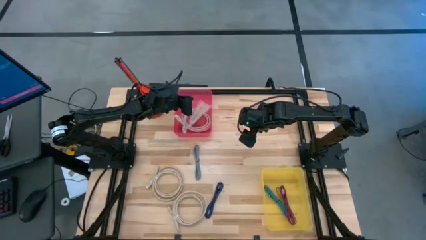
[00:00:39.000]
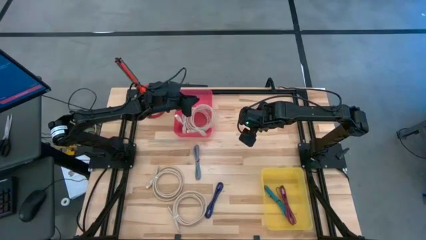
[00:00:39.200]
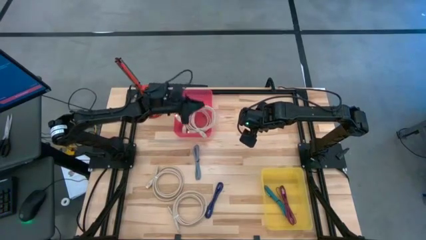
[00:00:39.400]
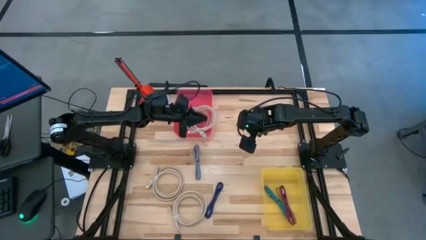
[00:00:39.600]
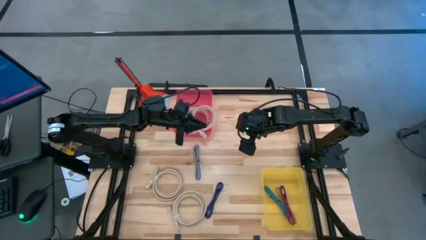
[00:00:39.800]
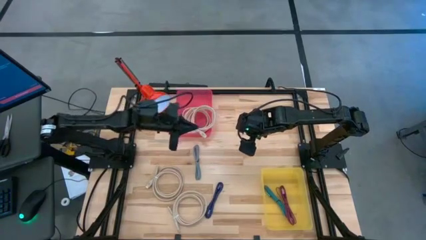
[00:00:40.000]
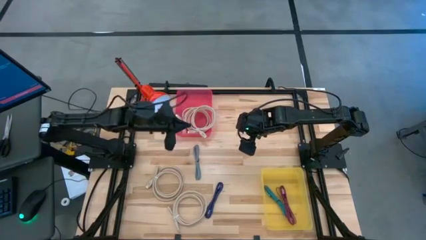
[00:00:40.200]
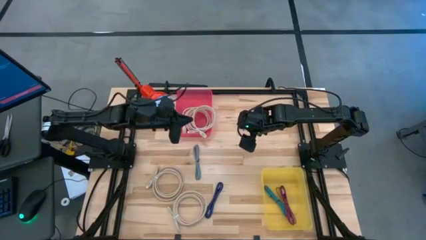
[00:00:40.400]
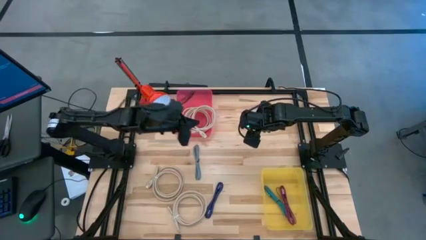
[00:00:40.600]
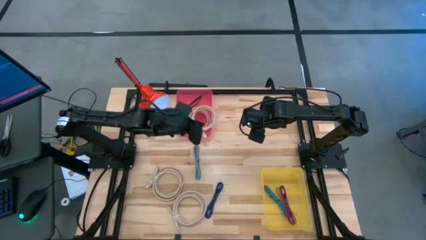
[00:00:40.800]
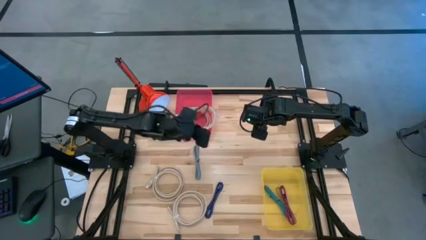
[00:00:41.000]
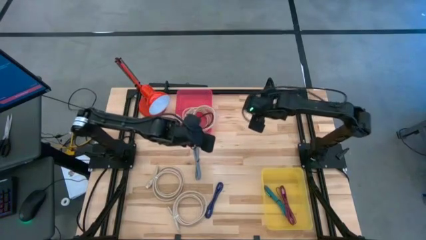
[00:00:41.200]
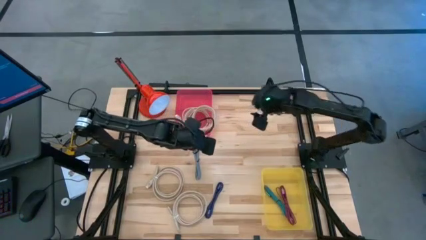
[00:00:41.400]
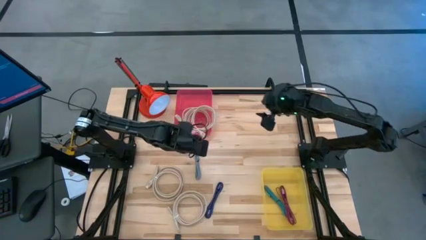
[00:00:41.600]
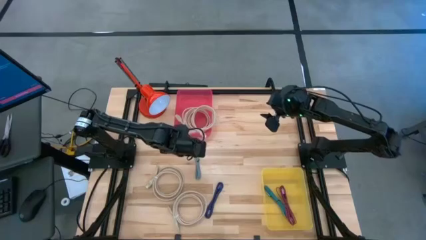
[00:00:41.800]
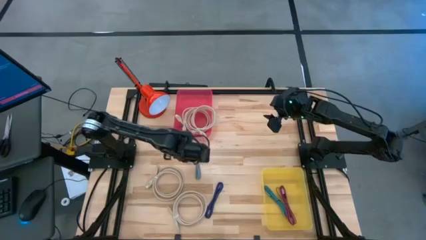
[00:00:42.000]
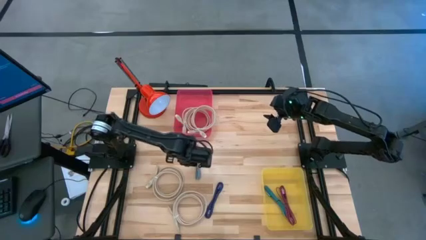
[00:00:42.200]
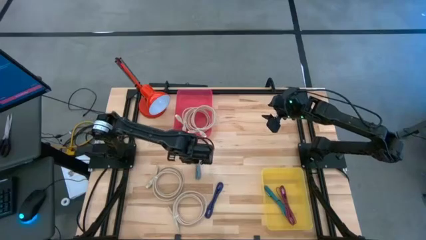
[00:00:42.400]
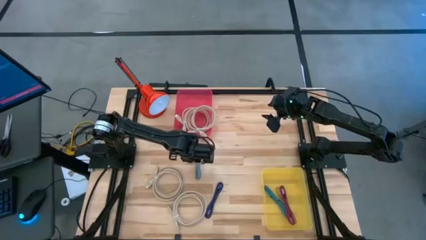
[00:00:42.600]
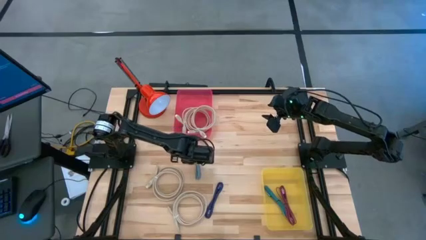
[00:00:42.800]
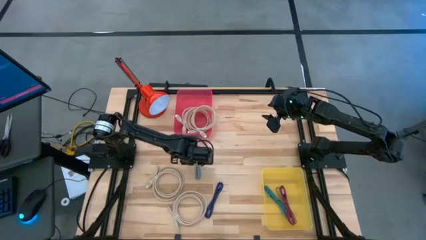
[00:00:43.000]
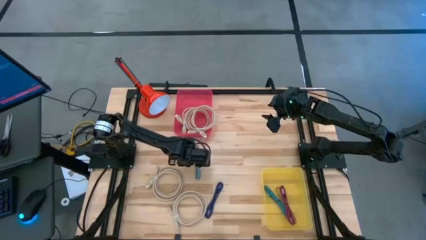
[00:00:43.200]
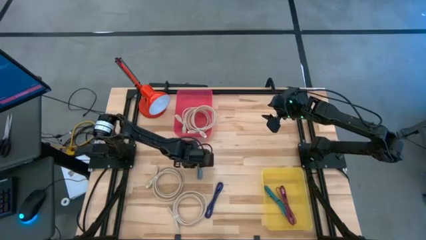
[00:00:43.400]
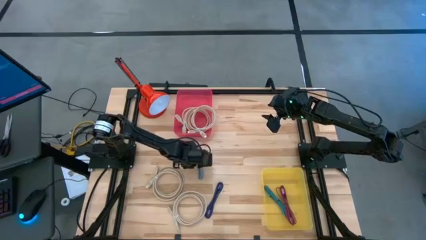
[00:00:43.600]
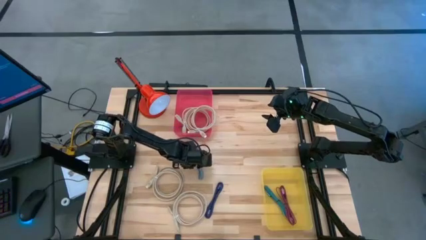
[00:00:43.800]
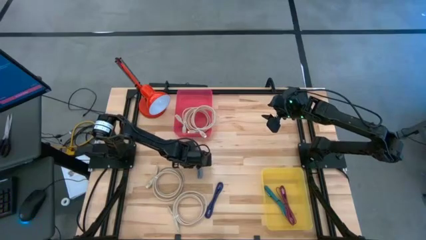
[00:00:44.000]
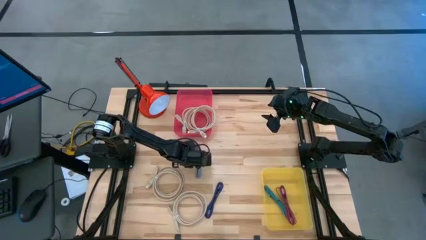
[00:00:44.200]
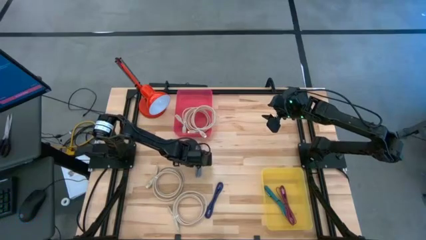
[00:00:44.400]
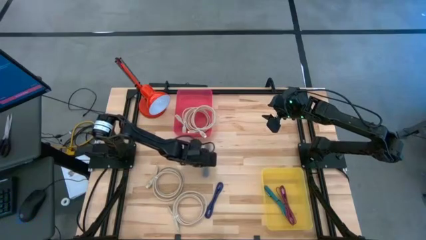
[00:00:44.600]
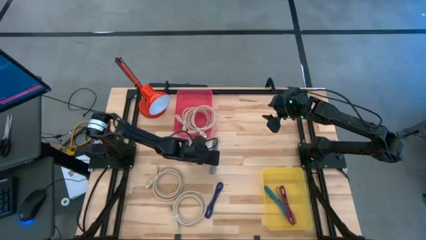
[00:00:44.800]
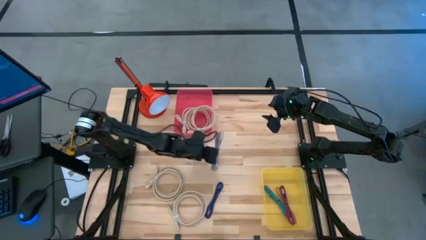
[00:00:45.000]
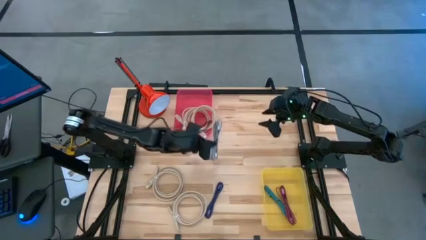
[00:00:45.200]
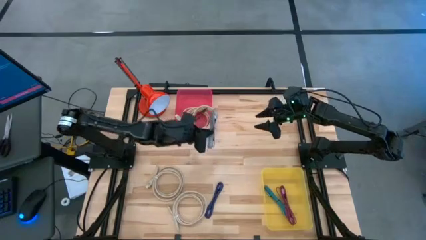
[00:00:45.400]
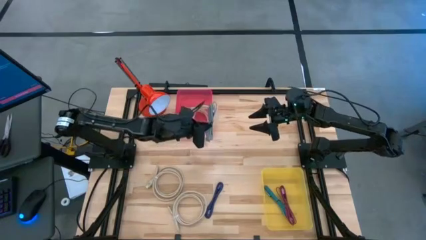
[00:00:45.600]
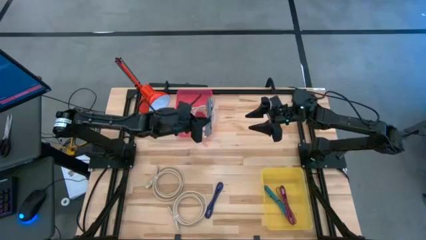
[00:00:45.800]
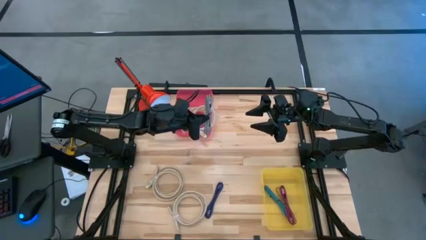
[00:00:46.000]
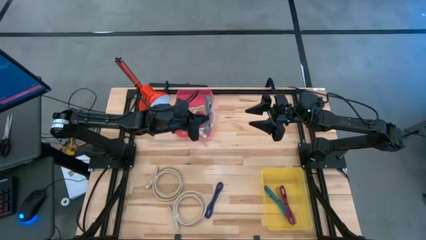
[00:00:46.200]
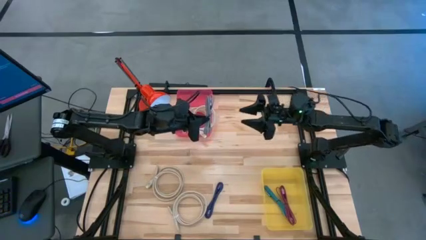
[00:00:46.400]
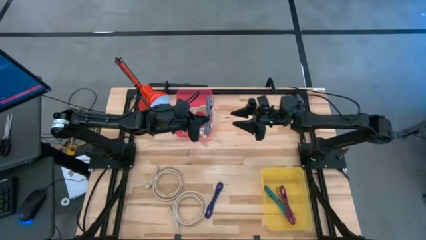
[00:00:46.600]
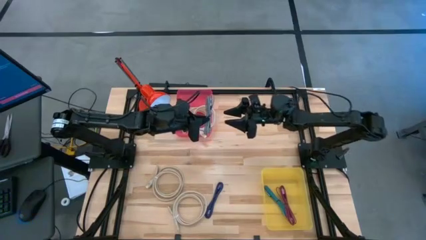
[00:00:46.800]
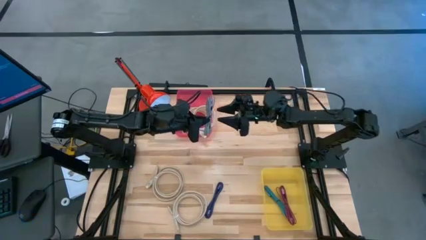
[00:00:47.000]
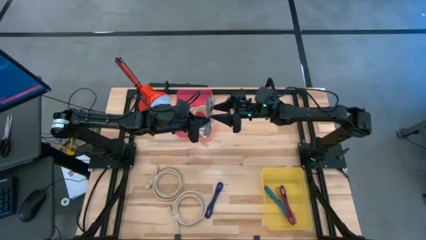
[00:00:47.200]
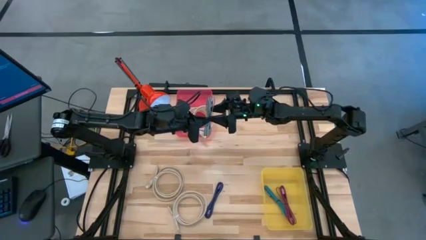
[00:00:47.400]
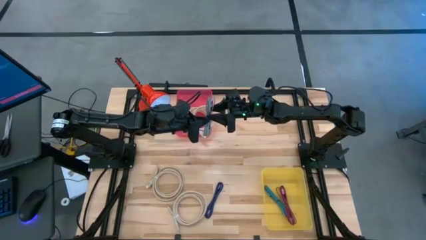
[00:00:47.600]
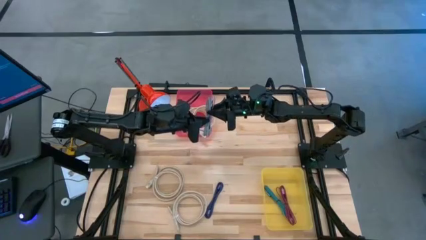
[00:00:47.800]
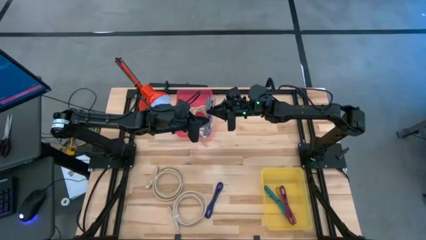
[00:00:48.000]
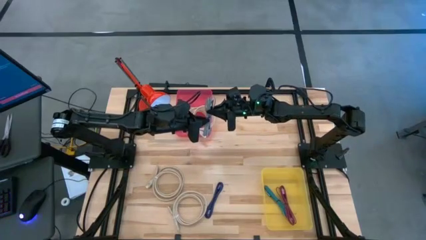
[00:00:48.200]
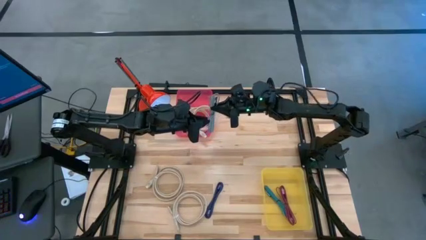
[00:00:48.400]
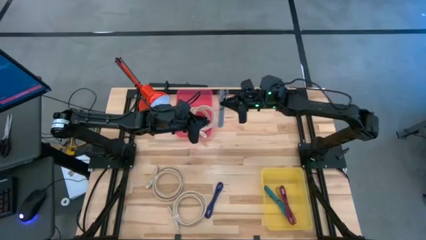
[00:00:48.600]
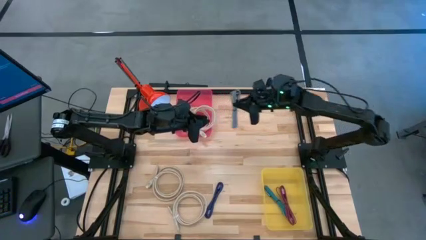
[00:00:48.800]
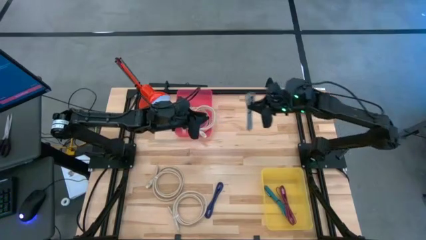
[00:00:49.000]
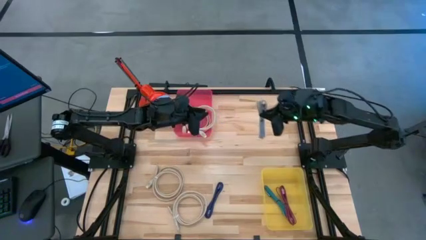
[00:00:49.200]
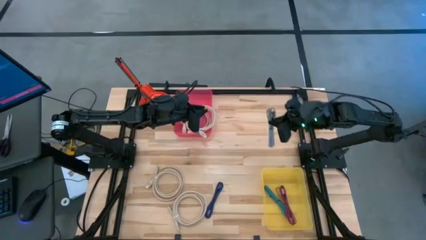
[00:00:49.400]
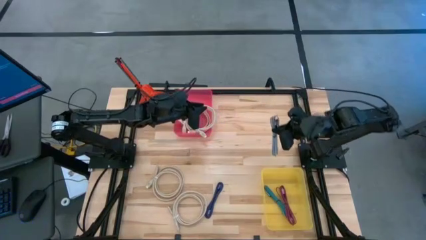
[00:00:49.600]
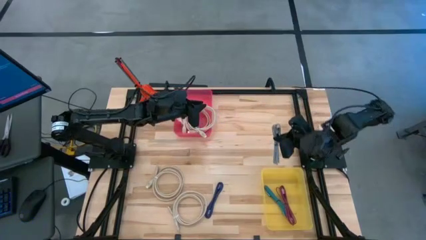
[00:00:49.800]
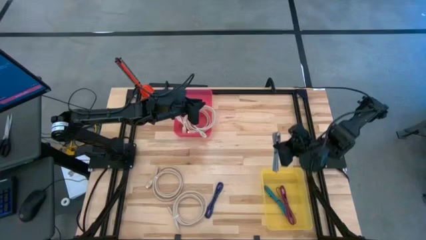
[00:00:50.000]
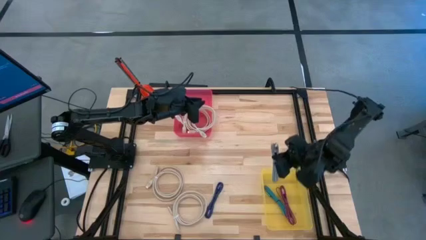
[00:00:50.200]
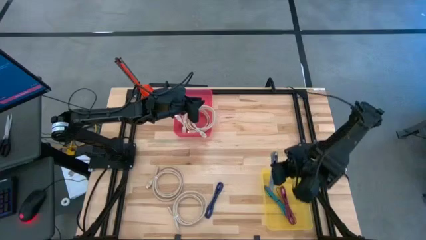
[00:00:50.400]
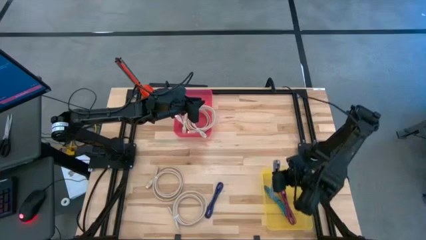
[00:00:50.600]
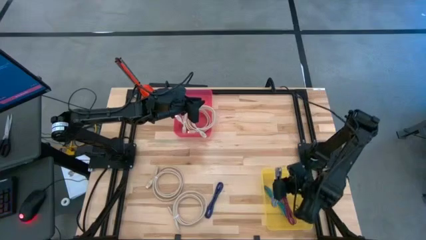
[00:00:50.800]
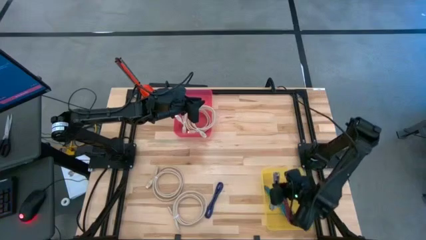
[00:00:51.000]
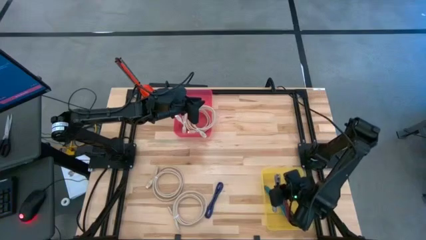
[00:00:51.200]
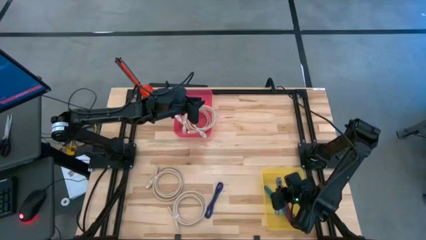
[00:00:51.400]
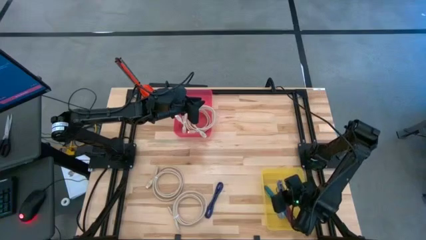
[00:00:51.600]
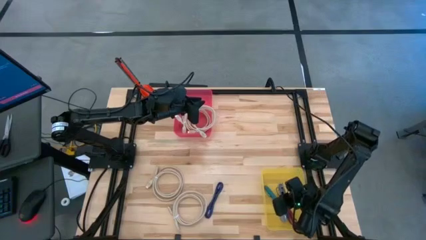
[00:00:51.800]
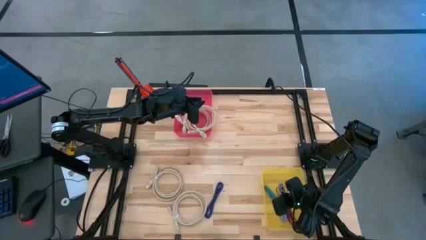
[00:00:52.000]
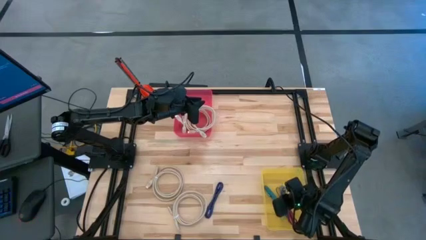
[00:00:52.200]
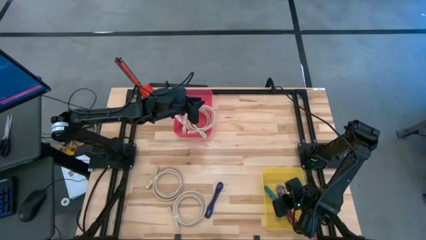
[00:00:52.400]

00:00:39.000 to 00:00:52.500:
Task: Pick & Place USB Port
Put the black and white charger cable into the yellow bin
